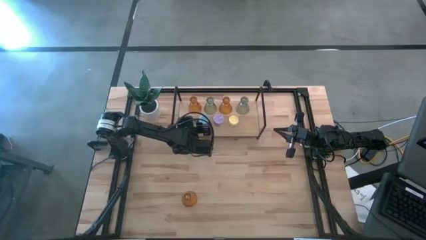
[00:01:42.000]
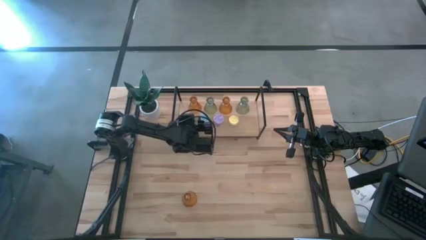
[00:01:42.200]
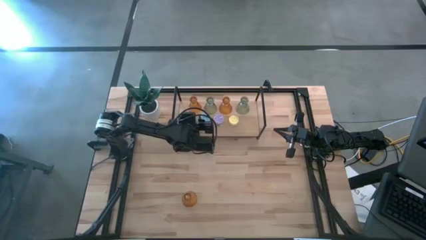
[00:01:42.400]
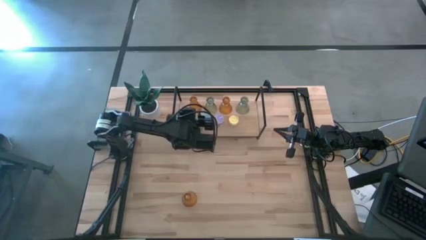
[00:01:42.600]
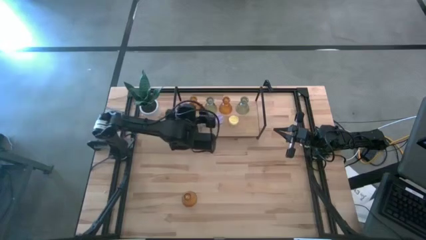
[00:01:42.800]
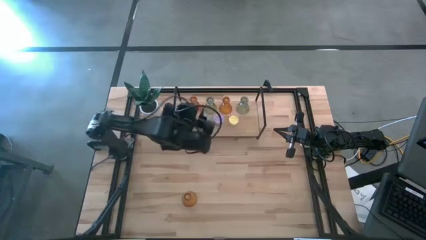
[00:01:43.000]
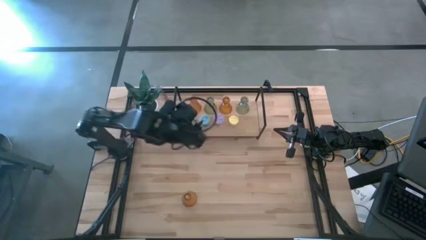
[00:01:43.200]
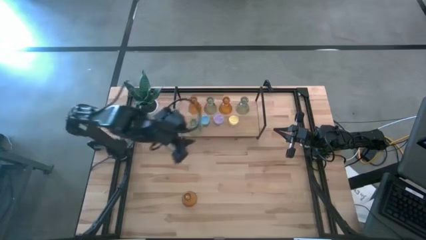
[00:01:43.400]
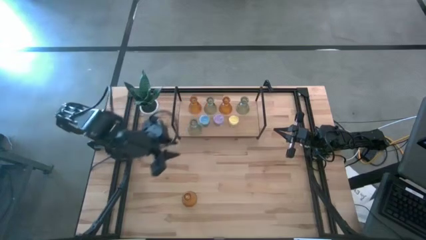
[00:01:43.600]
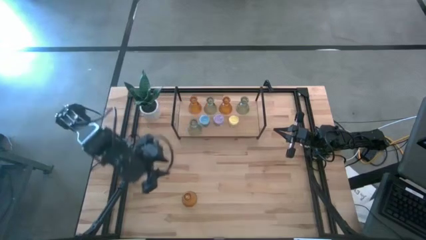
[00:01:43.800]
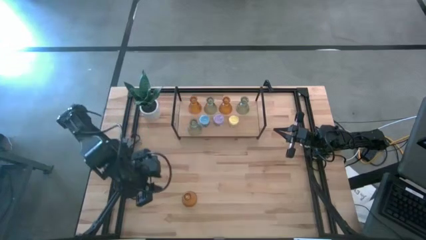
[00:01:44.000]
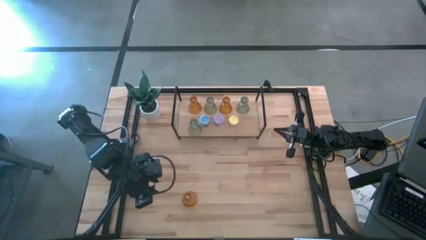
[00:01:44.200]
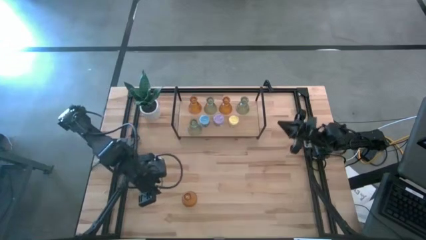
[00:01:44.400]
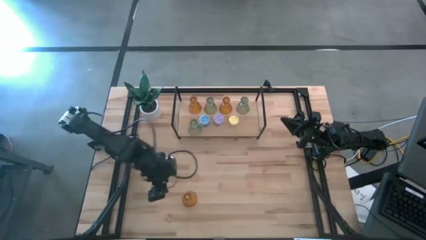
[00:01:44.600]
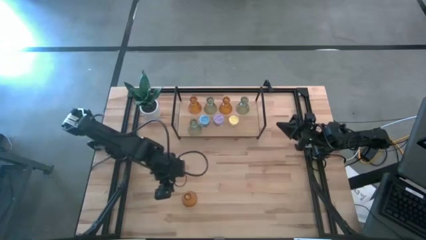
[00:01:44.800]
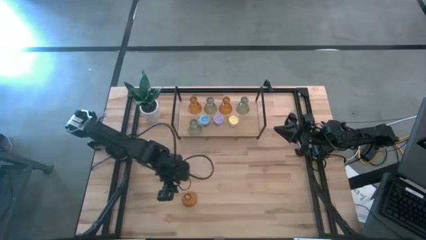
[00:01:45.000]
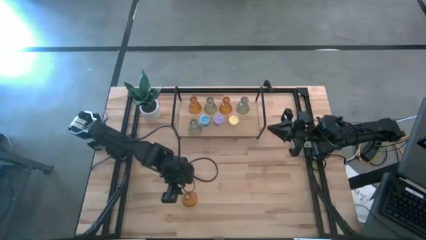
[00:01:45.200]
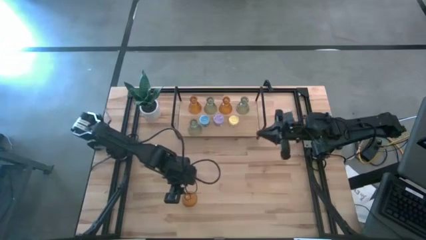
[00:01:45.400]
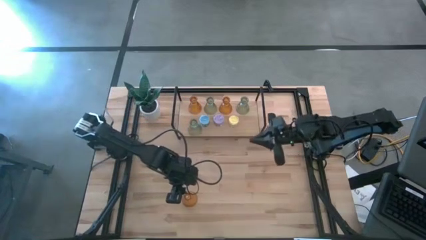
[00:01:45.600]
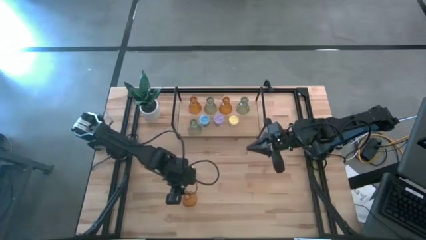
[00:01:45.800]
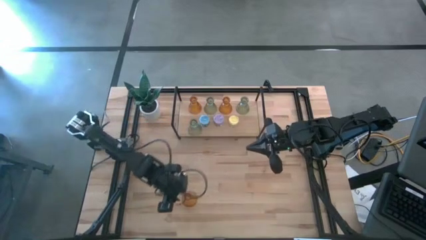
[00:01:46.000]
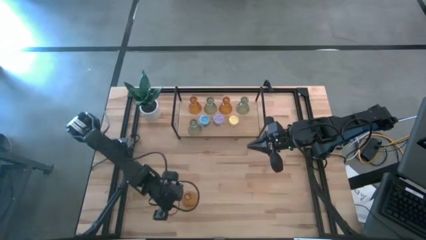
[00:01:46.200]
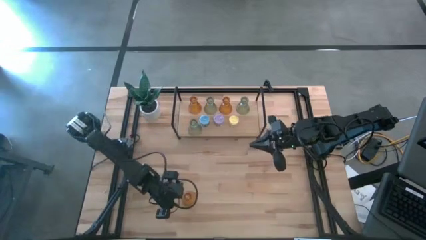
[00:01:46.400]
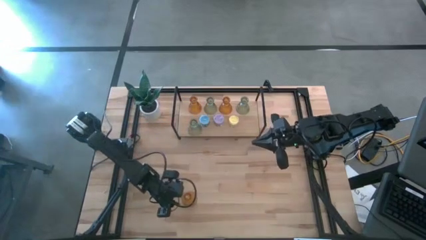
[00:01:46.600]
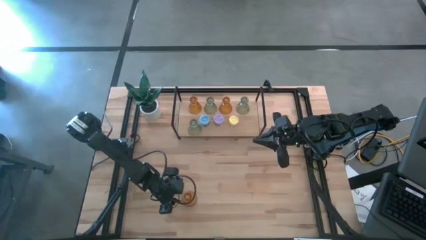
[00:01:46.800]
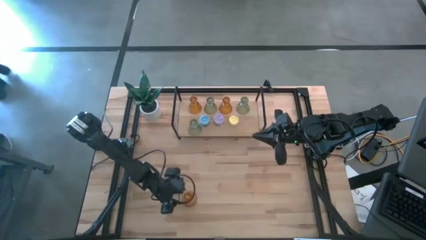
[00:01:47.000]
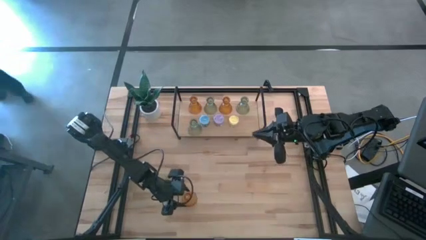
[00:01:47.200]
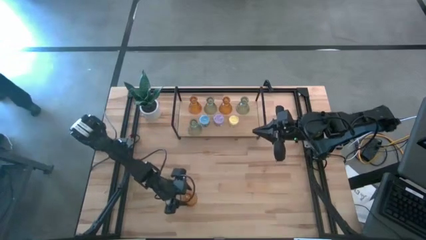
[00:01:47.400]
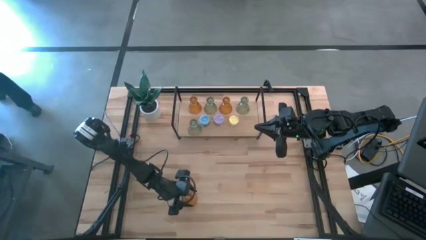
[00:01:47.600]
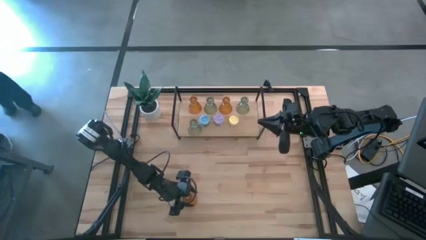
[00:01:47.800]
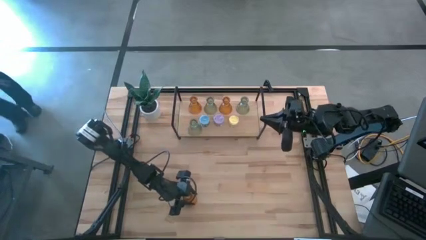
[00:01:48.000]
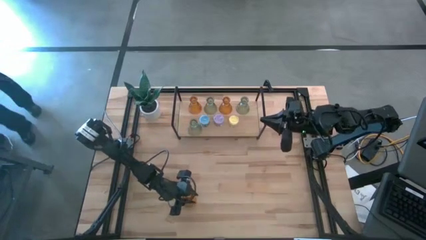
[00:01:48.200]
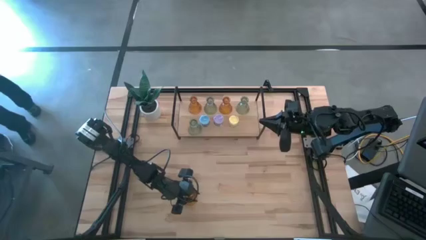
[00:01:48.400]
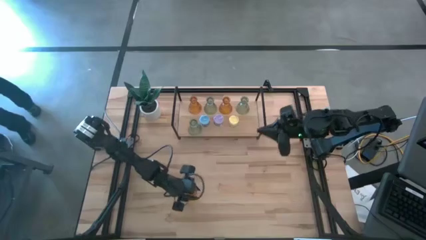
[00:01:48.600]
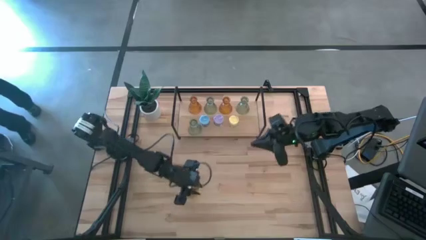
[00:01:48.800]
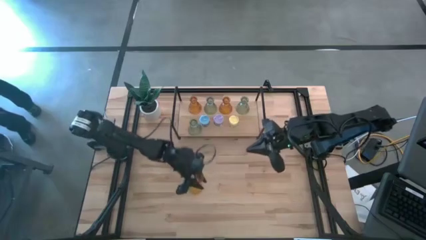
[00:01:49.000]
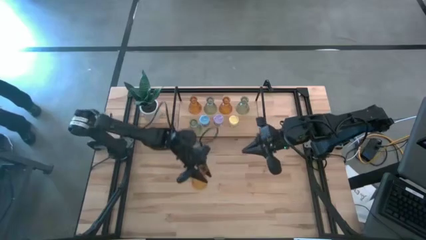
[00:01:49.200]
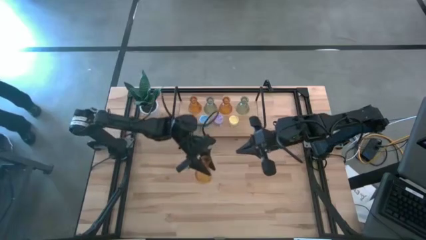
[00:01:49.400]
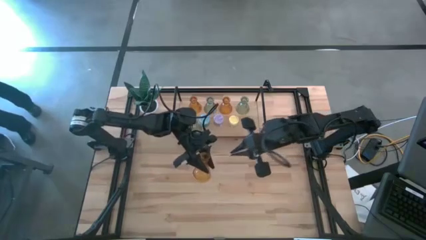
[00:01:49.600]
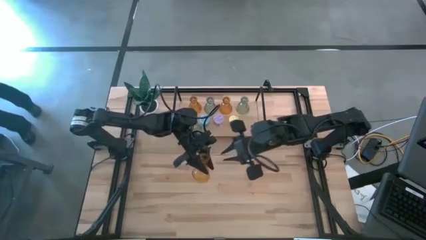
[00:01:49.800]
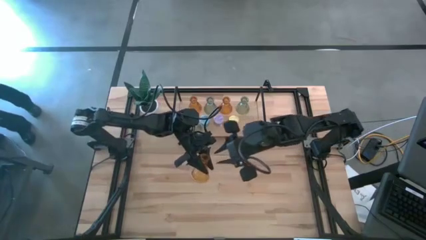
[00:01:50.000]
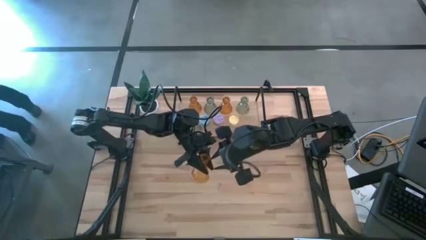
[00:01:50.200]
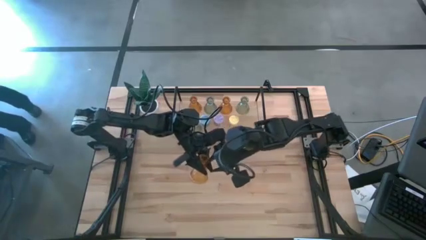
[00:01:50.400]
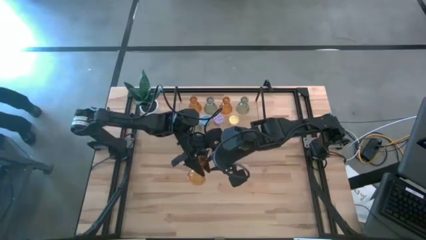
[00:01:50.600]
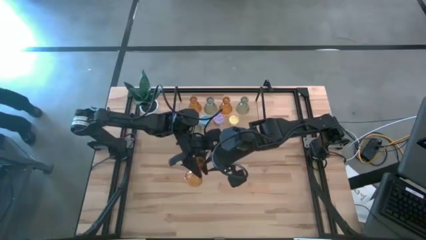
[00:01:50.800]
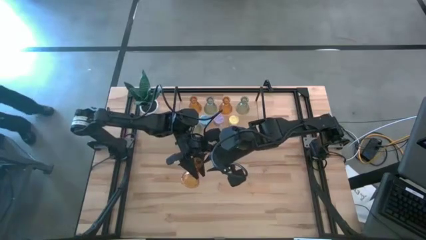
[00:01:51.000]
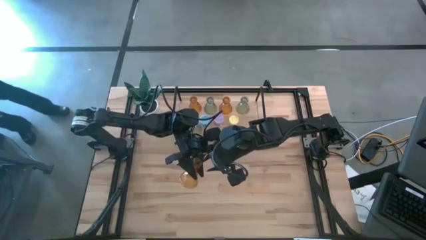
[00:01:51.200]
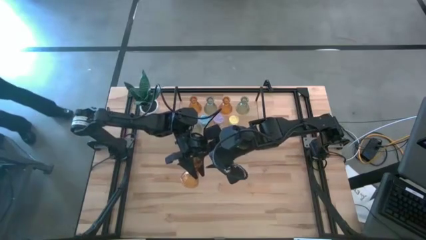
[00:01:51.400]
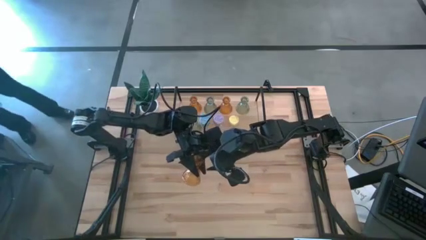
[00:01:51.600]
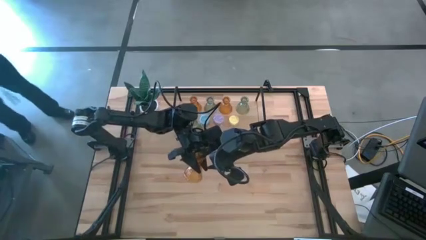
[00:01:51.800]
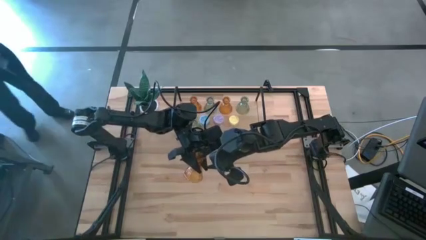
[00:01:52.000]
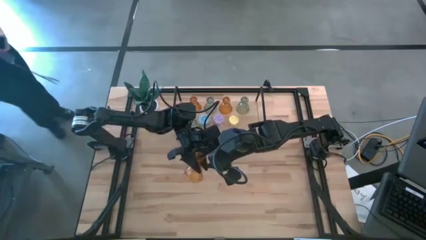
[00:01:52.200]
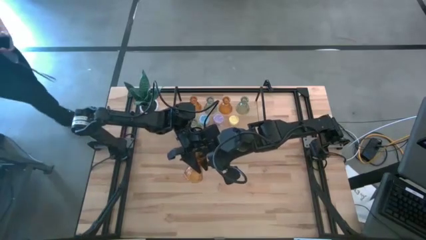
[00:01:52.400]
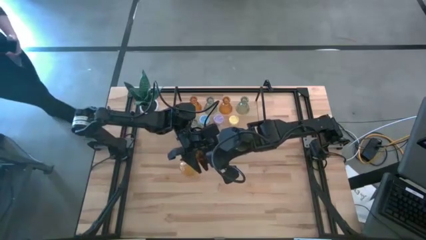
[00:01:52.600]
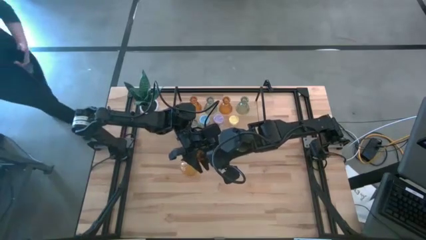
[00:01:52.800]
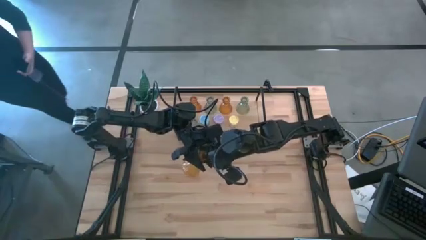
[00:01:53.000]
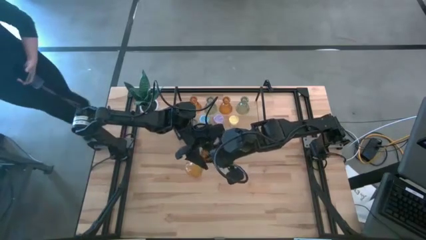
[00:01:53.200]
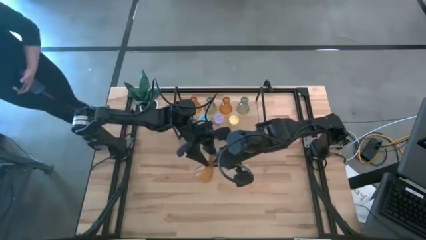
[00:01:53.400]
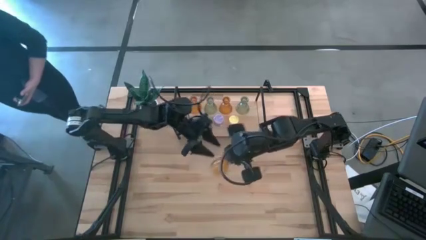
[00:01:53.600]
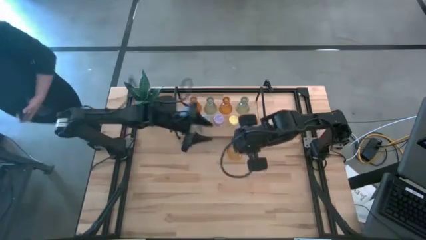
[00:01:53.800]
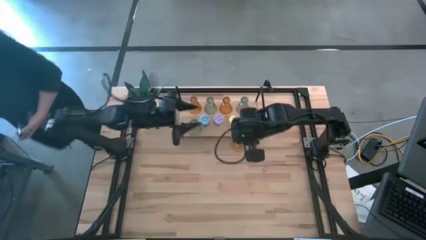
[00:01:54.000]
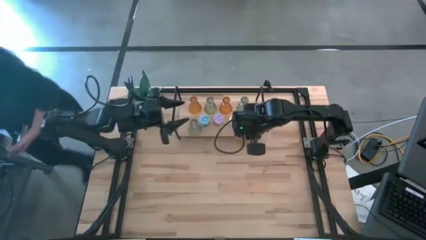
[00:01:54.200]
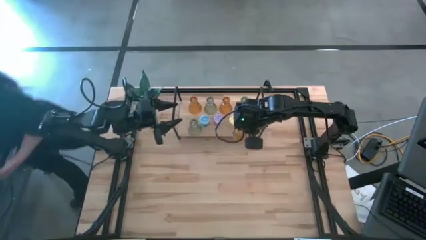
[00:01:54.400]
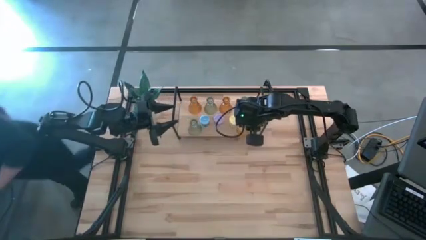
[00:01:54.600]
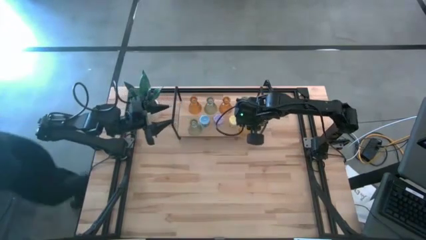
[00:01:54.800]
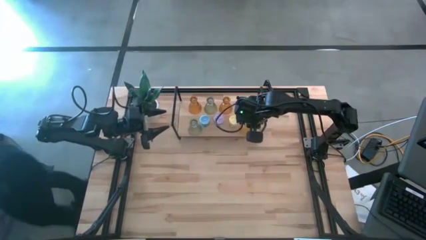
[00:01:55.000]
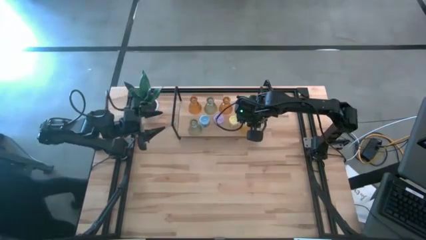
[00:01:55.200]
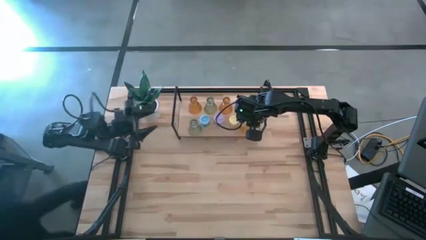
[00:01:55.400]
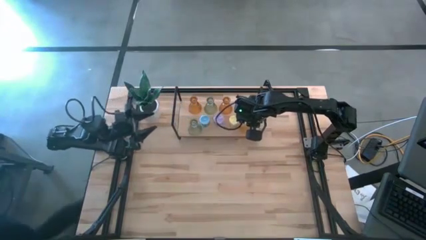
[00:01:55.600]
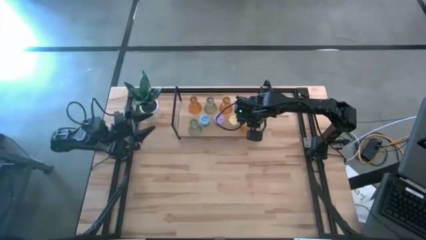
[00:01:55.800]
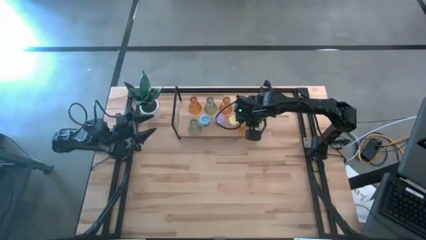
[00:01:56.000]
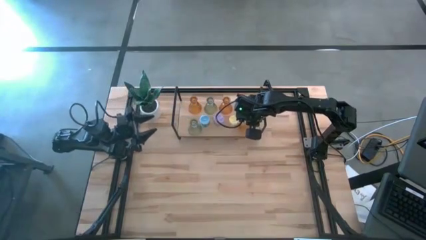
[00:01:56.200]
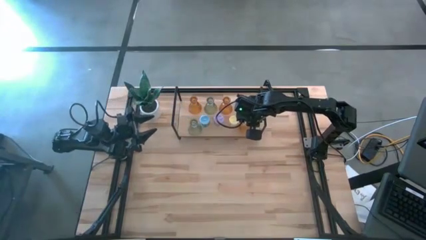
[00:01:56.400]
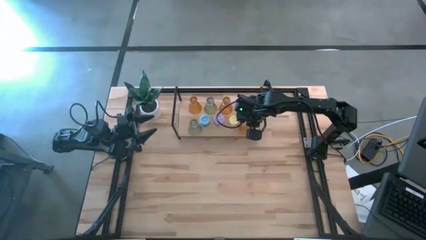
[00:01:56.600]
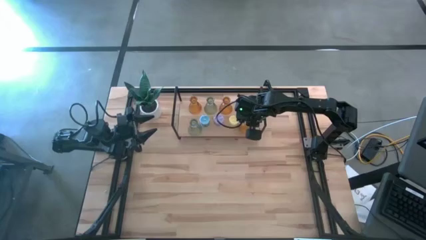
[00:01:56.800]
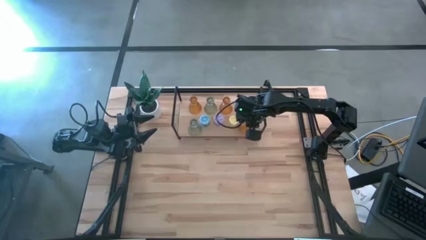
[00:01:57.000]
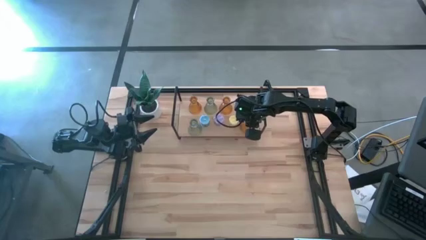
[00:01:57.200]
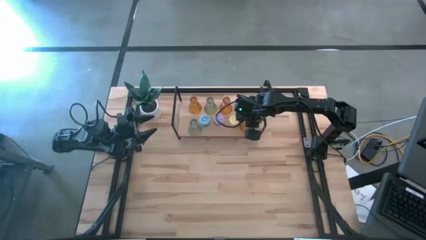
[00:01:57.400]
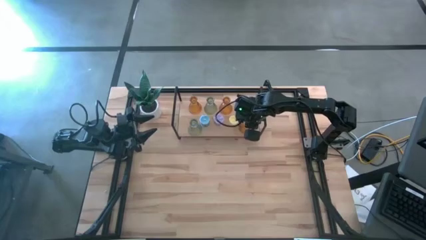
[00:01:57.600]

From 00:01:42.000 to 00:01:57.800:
Task: Pick & Place candle stick holders
Put the yellow glass candlestick on the shelf
